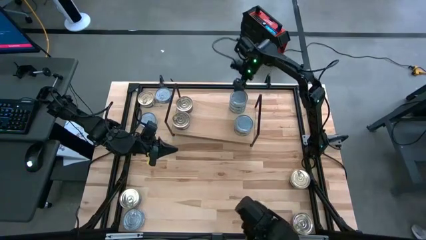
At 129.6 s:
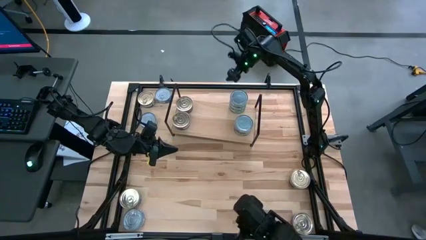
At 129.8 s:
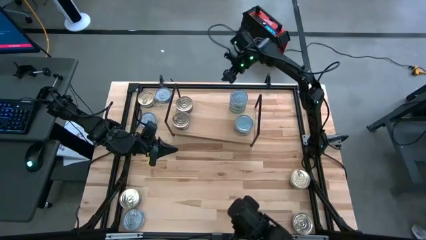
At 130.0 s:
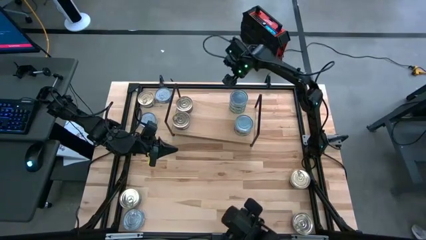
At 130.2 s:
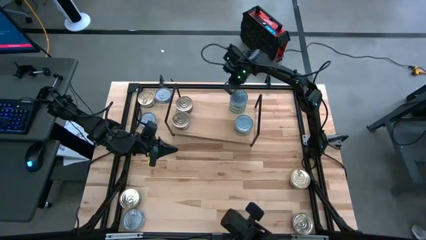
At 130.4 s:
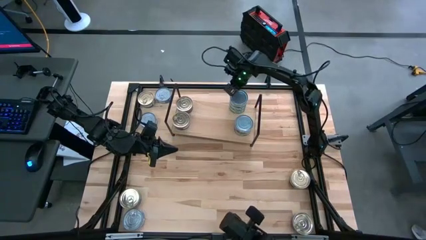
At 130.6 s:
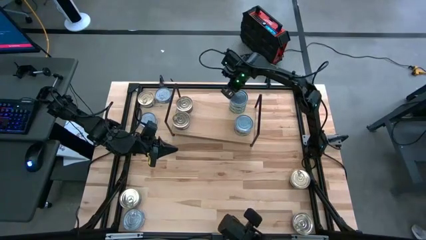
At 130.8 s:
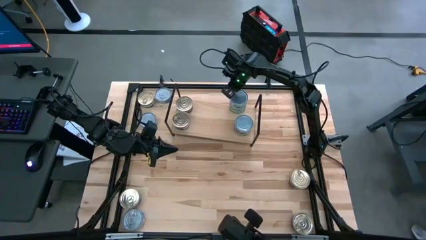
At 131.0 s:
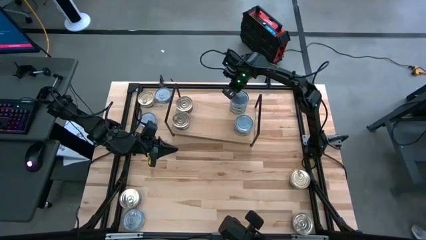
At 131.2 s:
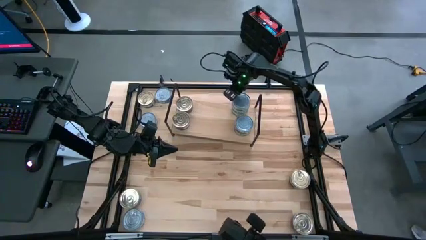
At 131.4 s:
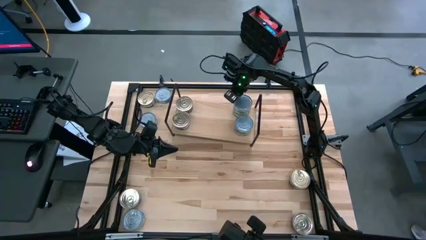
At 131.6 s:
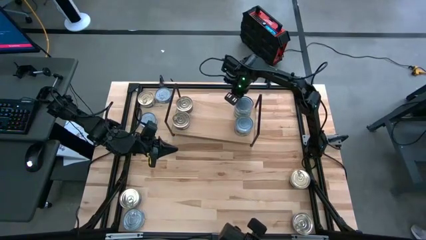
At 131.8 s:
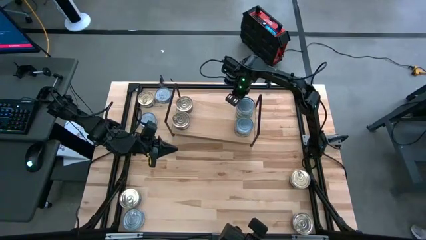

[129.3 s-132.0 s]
Task: Stack canned seafood by type on shelf
Adjust the stacked green tuna cans on the shelf

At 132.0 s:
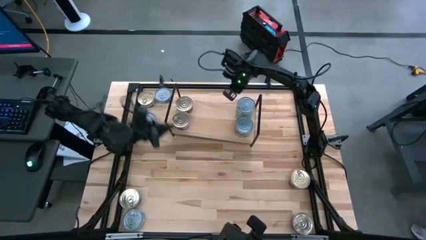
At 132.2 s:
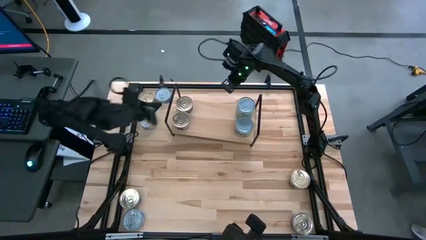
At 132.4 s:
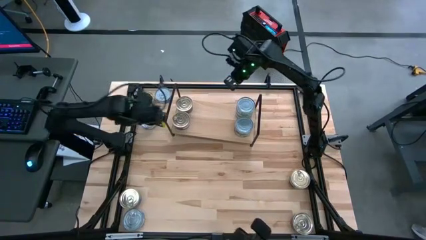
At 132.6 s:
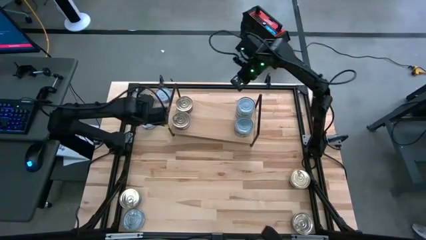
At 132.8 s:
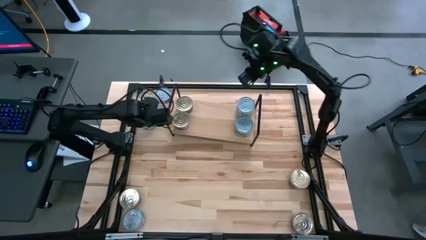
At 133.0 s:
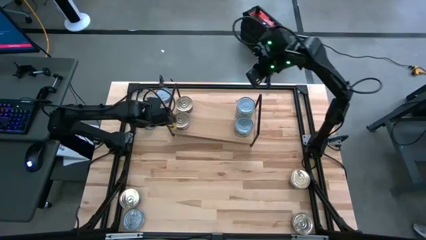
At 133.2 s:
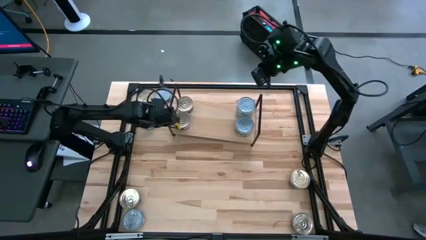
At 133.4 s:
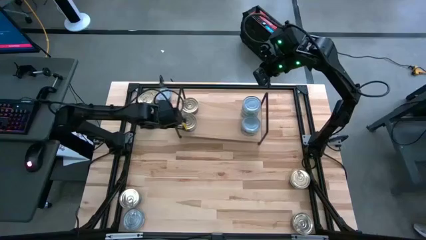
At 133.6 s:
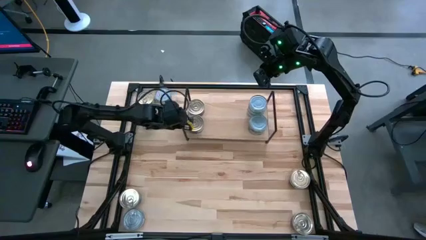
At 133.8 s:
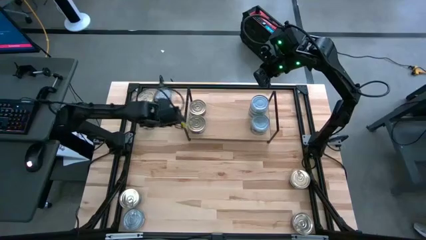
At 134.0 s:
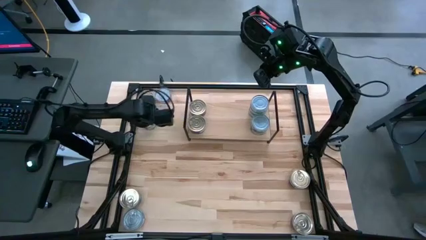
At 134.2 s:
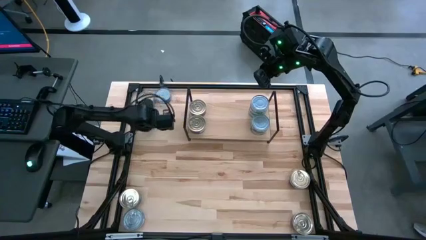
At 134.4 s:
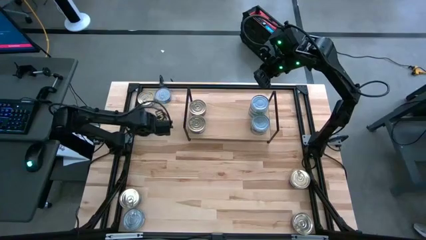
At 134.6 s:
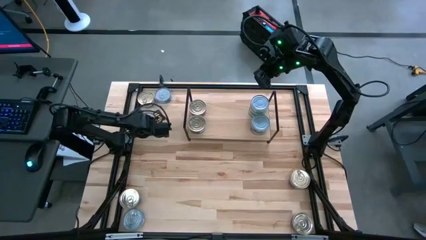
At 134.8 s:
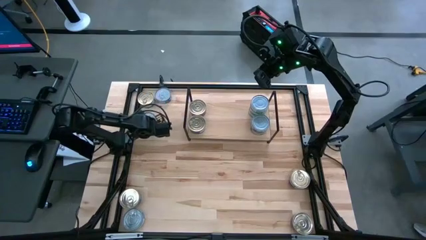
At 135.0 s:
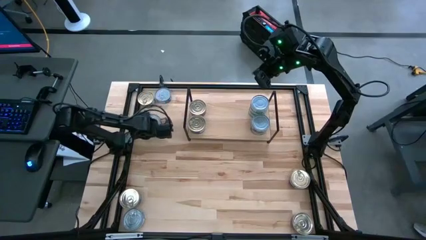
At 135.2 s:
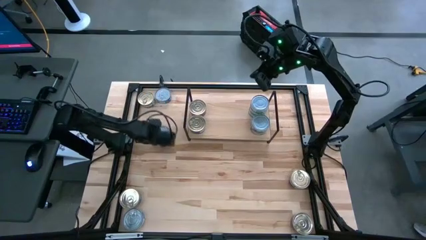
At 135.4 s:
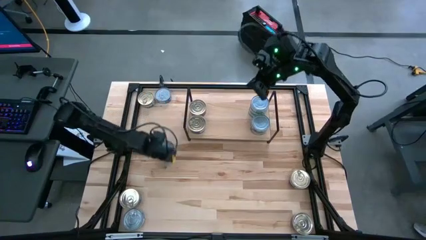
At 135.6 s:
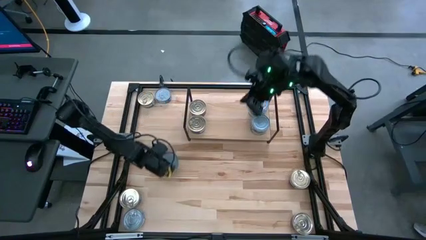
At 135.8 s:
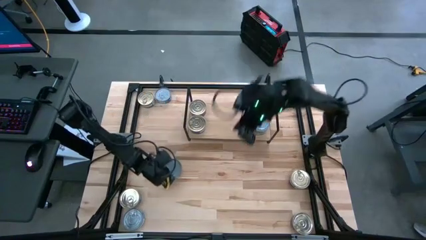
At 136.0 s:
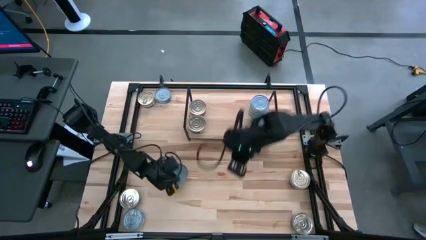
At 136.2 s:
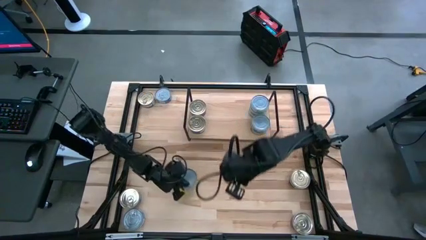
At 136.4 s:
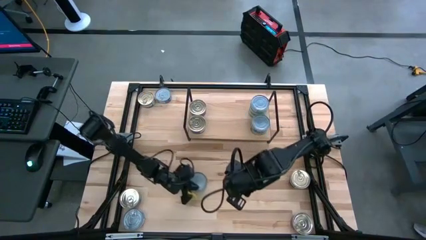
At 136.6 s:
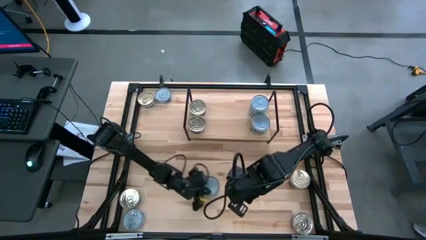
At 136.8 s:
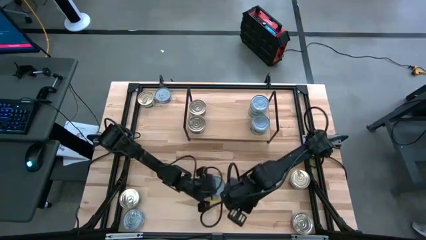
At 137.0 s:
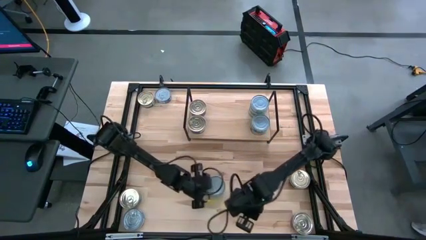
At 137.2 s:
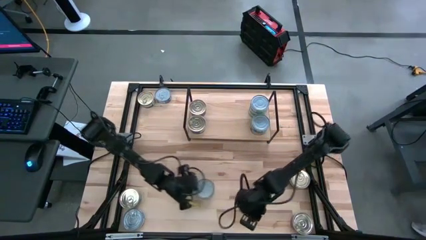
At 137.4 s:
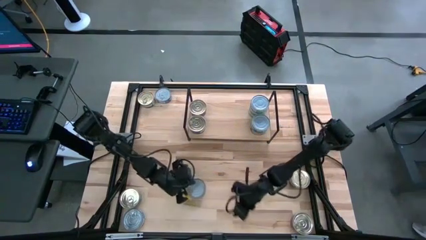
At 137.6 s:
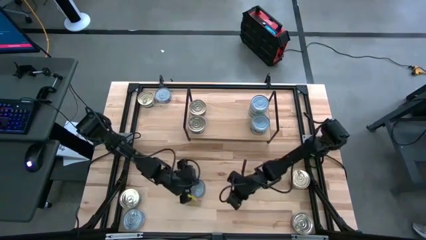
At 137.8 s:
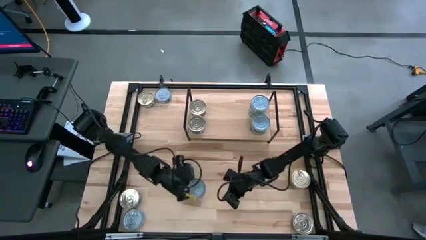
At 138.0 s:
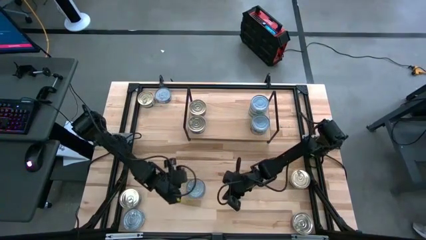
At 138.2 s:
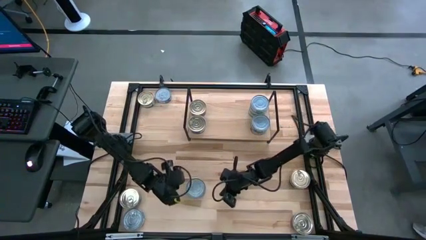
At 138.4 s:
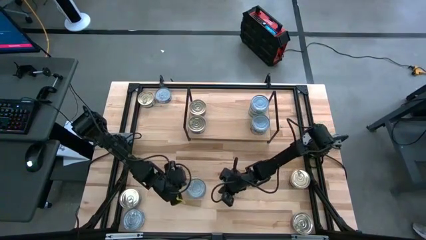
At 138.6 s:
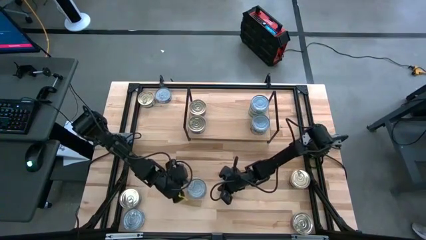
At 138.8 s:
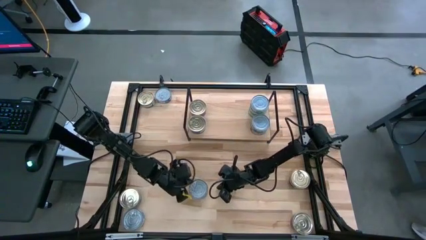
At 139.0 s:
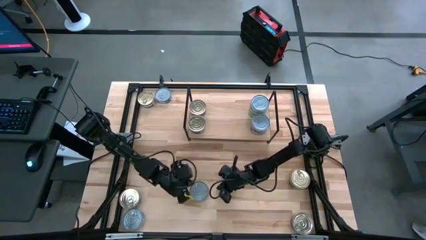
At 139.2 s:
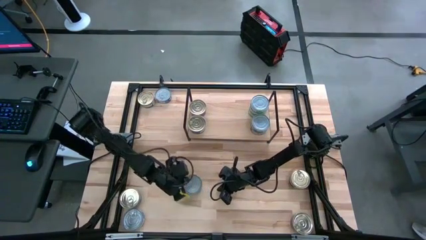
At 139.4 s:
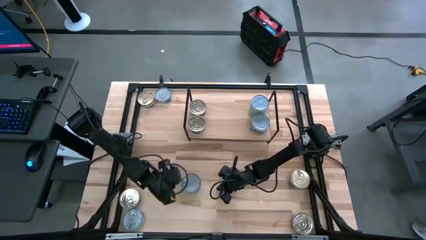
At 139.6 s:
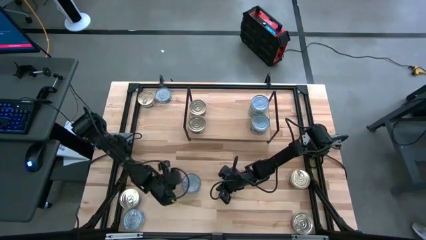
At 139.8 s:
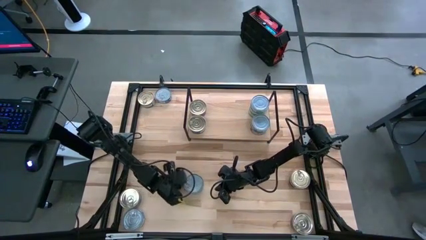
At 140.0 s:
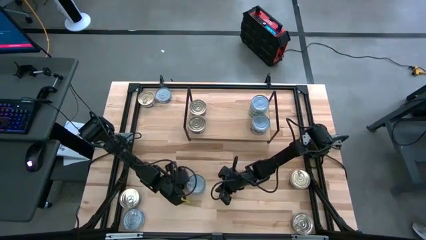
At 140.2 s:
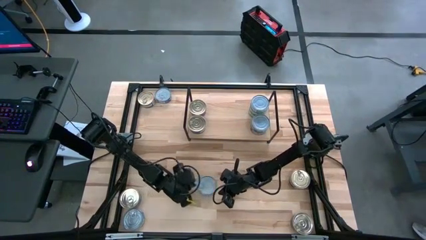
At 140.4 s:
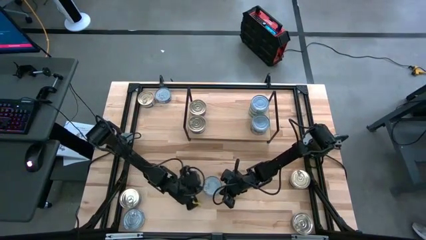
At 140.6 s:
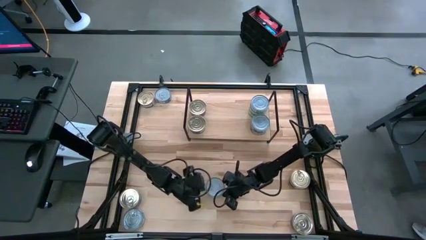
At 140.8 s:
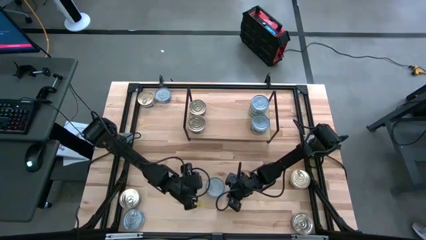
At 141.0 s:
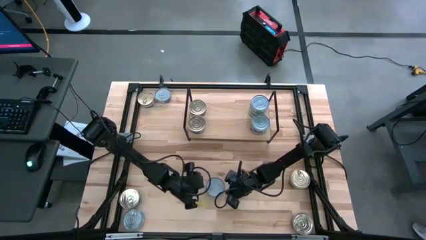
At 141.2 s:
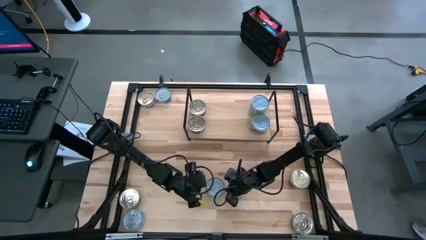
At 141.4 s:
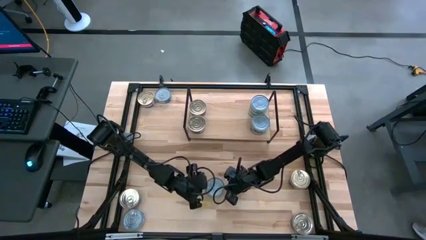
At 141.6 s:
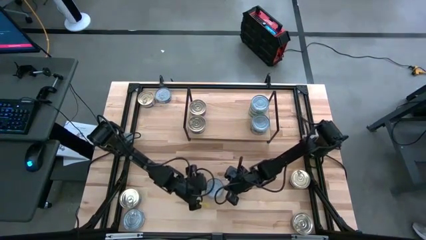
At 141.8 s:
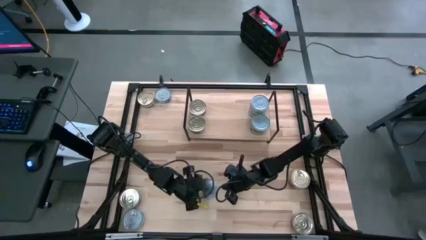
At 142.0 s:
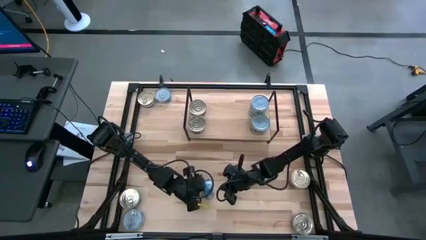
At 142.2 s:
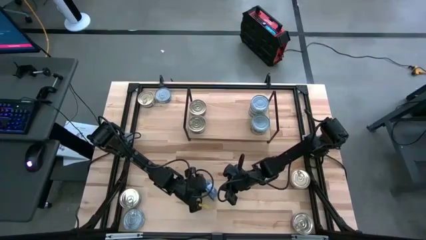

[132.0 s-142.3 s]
Put the blue tuna can on the shelf
